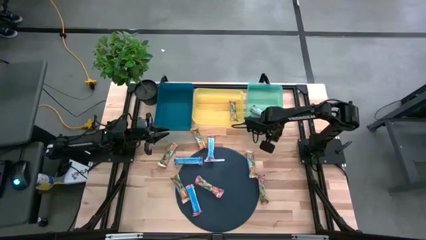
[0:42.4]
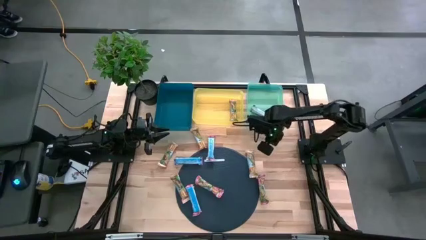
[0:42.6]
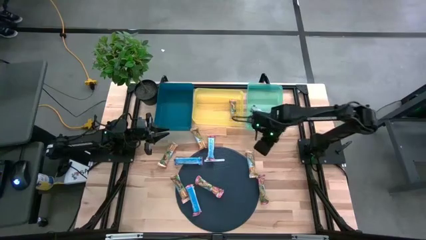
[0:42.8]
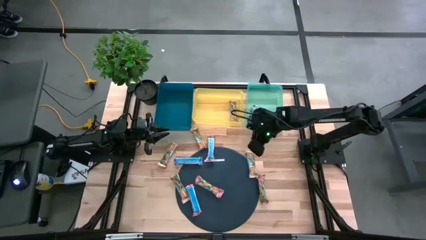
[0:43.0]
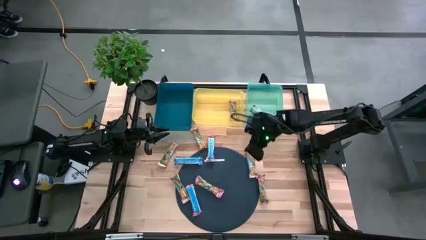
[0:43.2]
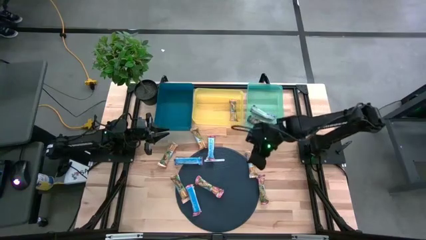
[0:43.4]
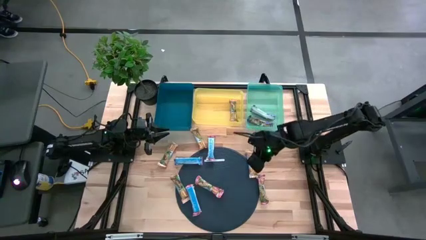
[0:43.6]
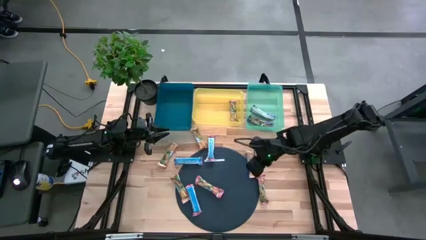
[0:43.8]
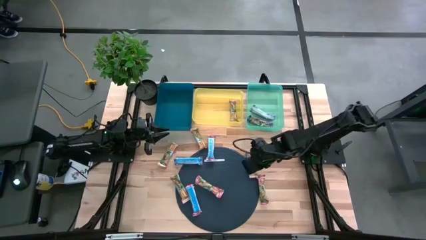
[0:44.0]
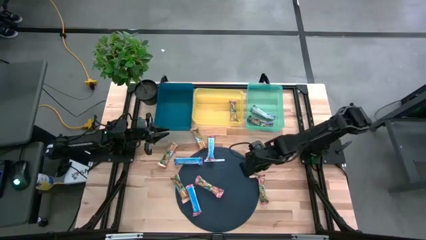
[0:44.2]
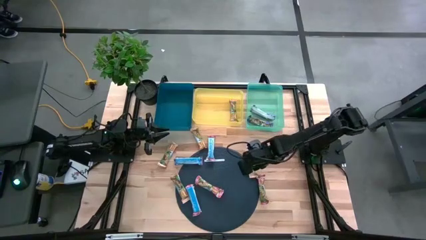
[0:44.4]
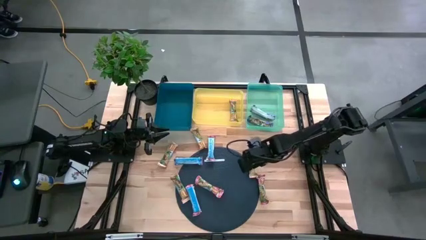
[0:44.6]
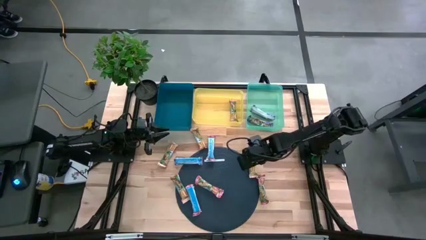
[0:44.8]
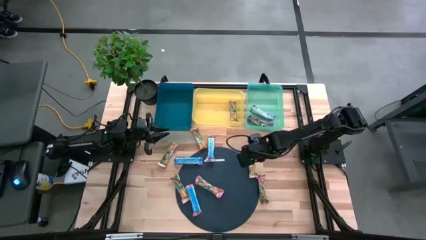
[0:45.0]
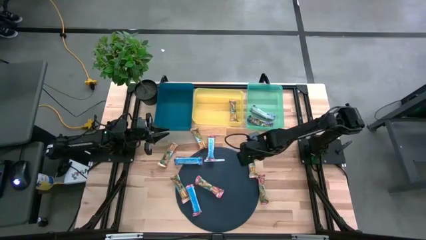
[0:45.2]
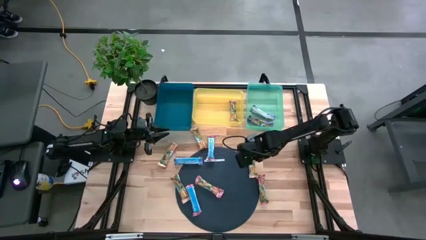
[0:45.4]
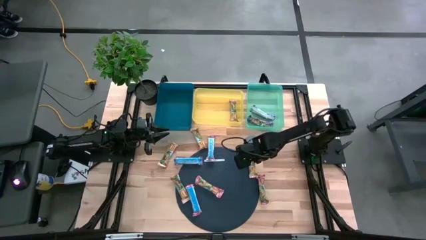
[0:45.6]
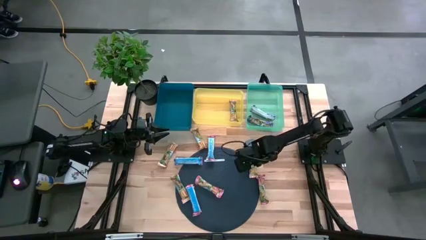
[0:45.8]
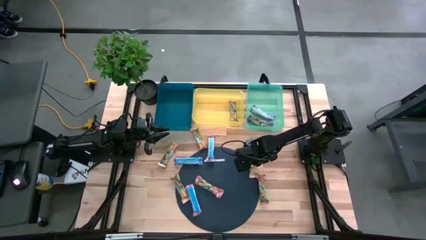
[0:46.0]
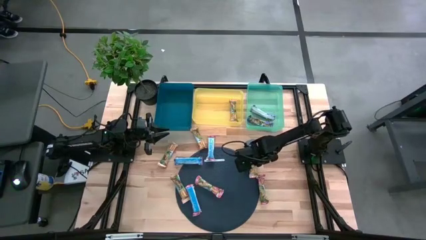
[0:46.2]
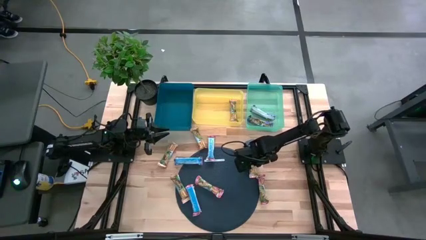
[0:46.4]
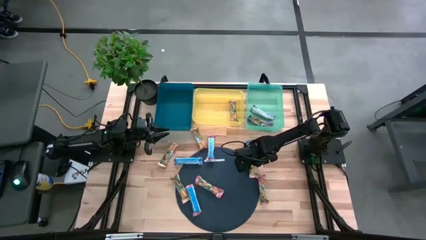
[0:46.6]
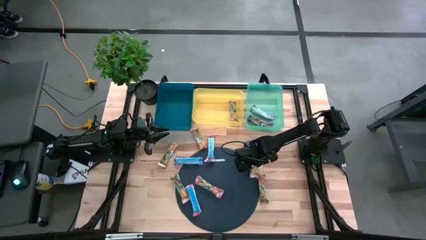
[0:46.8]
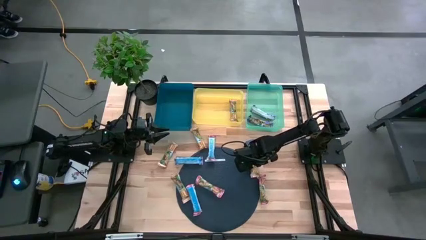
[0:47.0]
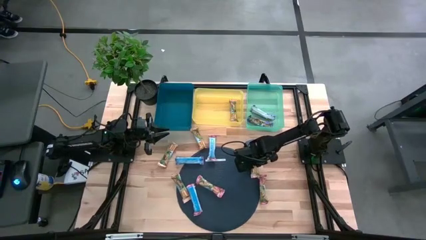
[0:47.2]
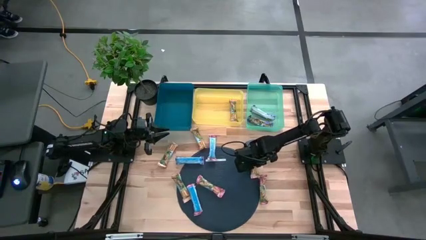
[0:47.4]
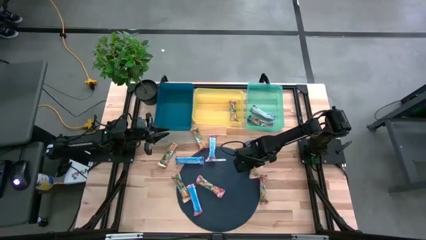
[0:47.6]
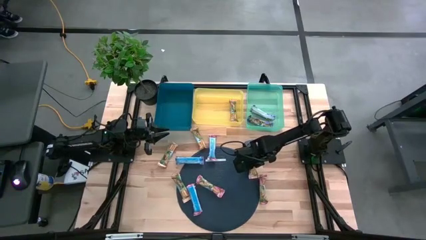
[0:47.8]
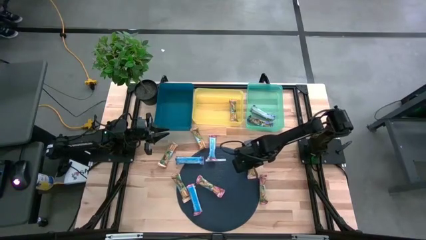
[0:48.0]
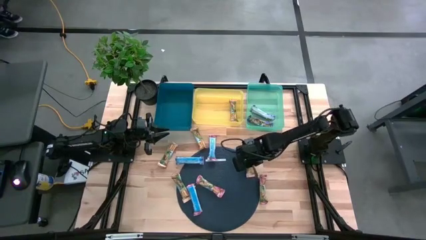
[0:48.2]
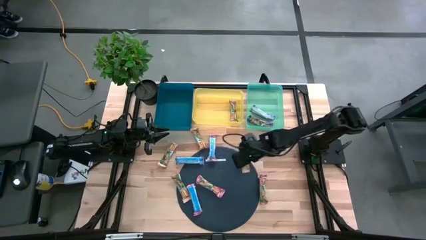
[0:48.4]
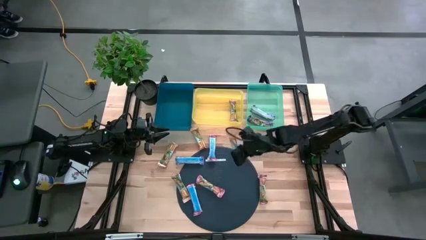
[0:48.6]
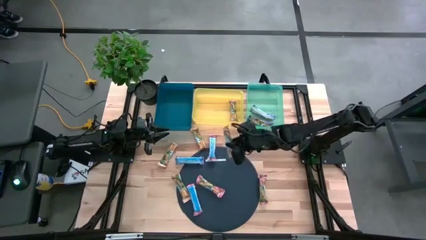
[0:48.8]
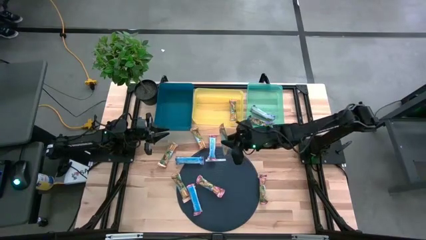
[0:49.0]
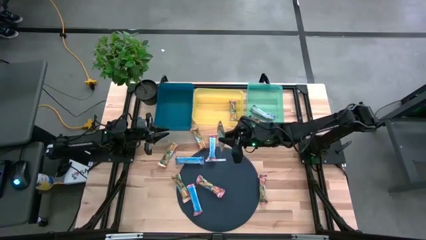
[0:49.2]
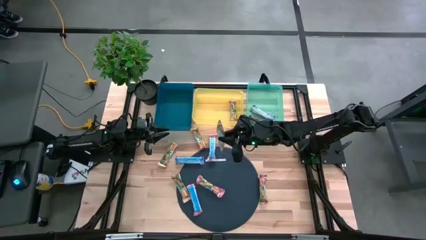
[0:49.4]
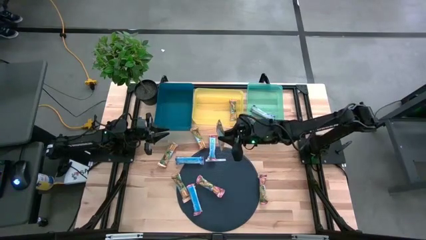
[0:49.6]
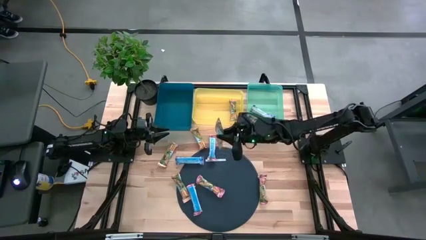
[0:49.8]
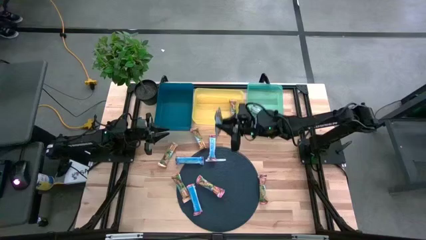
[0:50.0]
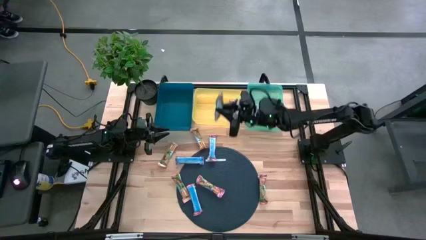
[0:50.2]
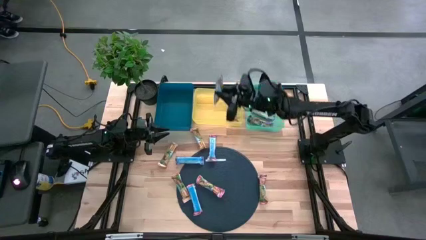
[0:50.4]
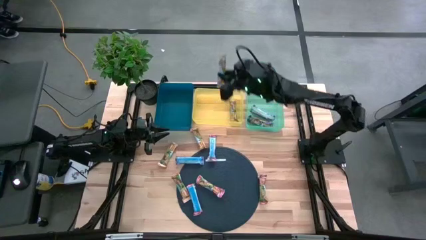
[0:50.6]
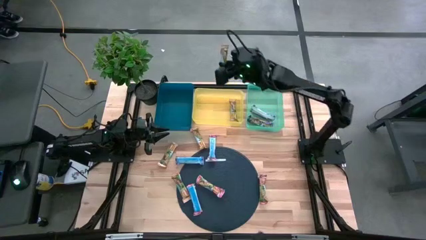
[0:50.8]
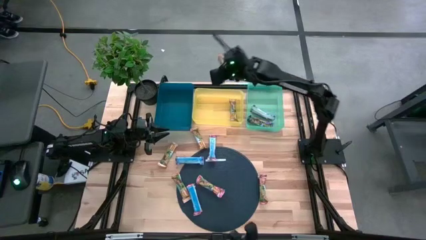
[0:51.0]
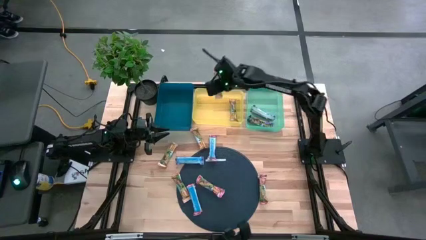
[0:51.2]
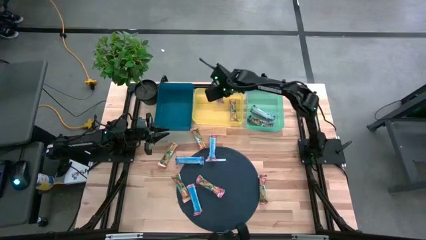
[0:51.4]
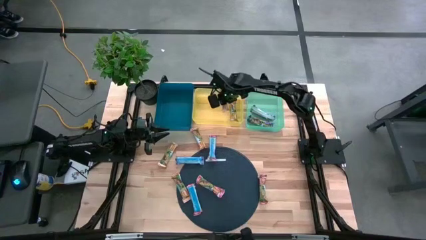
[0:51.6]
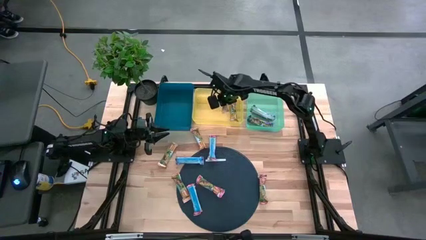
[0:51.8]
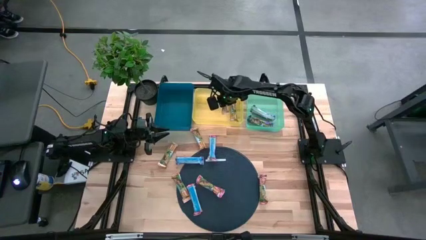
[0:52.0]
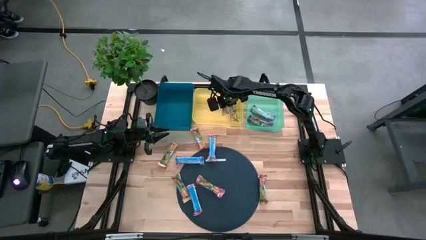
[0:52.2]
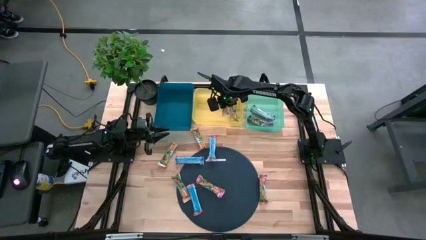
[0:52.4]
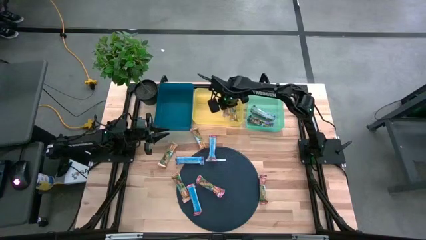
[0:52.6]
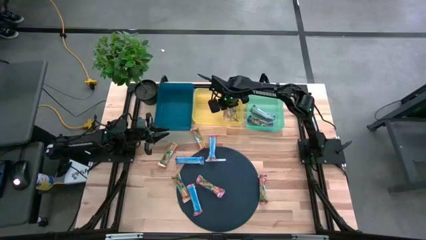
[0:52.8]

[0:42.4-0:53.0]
Task: Pick and place Granola Bars by type
Put the orange granola bar into the yellow bin

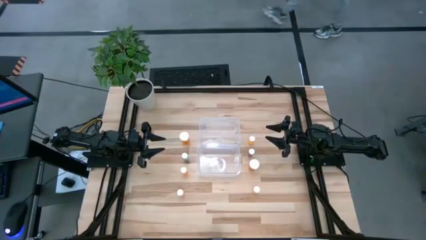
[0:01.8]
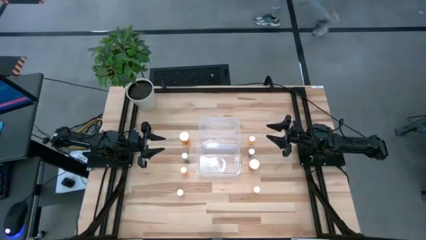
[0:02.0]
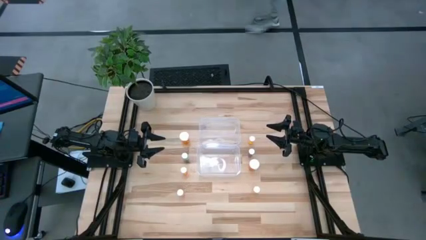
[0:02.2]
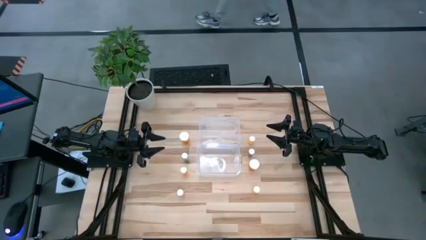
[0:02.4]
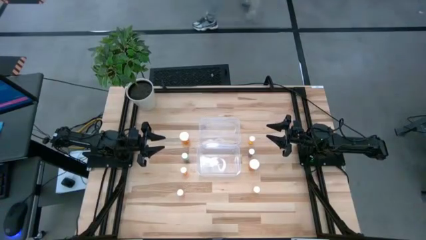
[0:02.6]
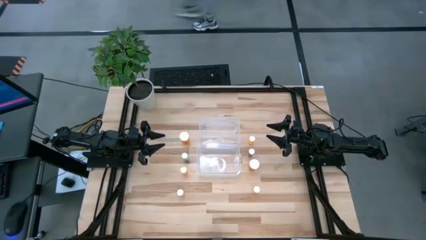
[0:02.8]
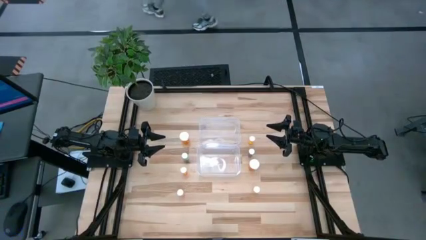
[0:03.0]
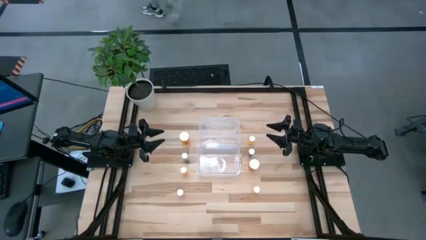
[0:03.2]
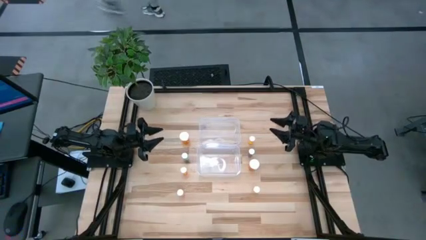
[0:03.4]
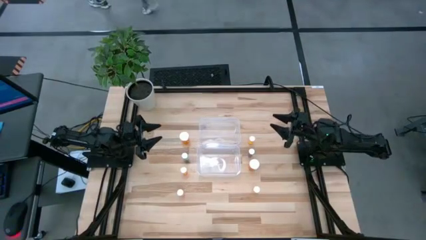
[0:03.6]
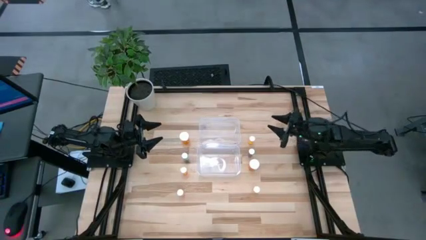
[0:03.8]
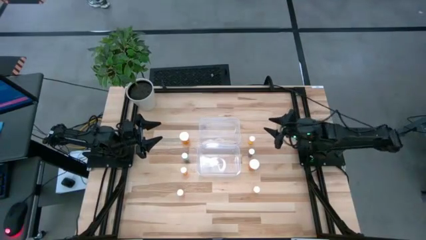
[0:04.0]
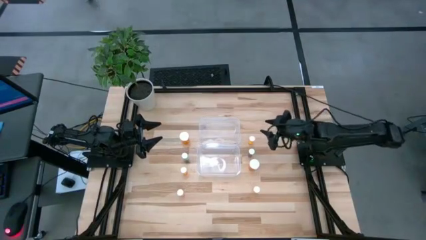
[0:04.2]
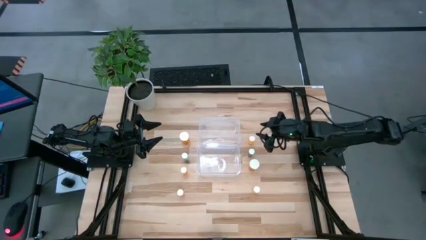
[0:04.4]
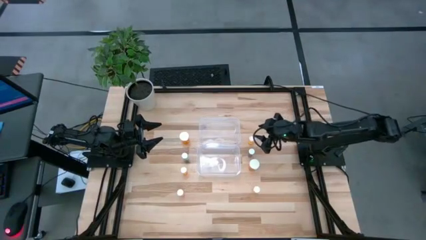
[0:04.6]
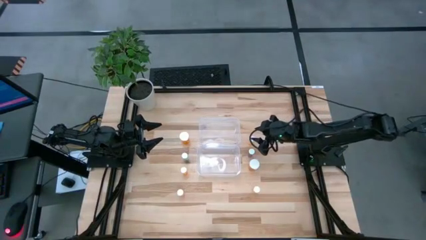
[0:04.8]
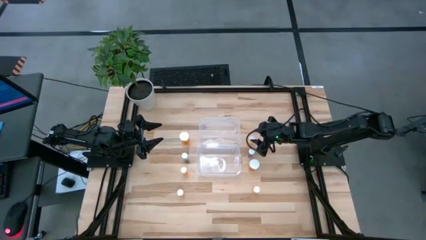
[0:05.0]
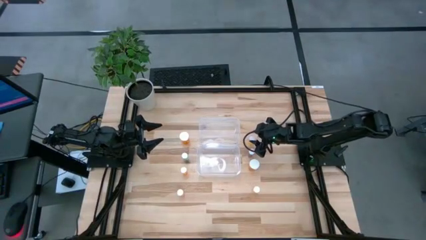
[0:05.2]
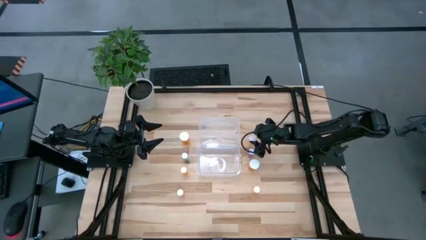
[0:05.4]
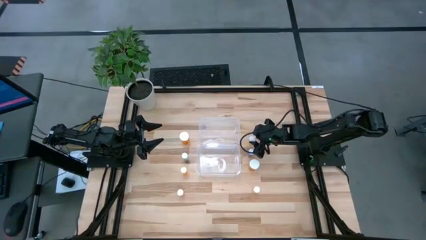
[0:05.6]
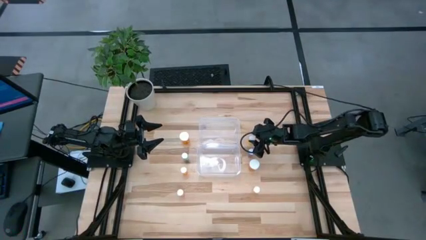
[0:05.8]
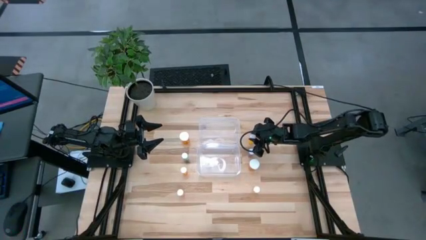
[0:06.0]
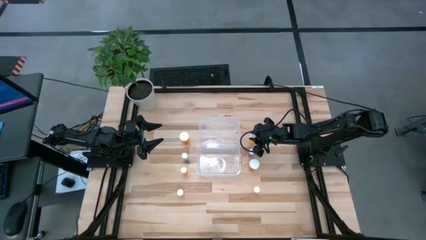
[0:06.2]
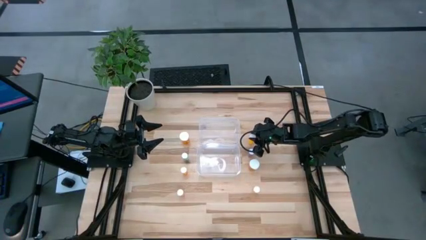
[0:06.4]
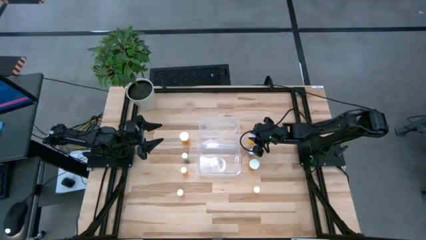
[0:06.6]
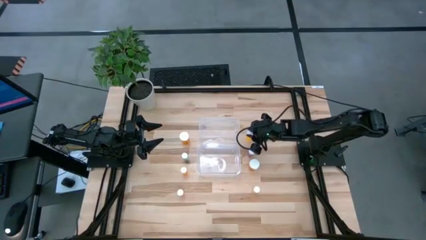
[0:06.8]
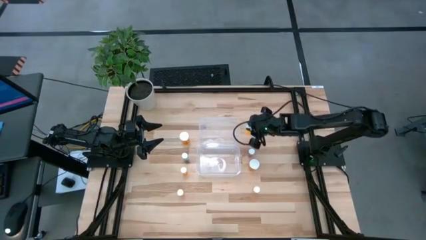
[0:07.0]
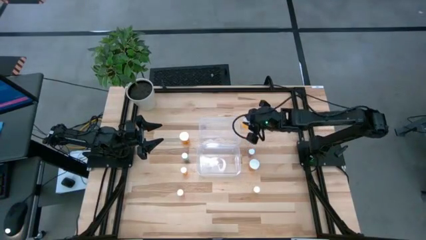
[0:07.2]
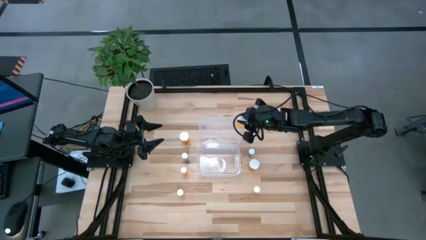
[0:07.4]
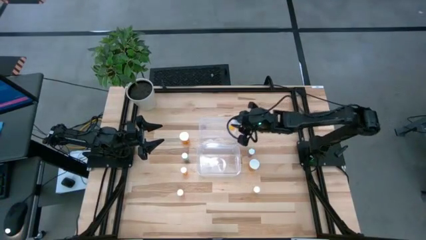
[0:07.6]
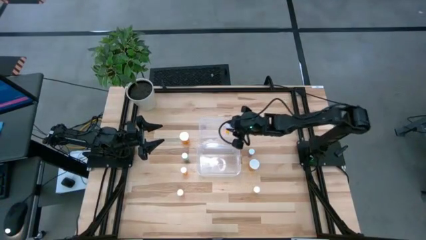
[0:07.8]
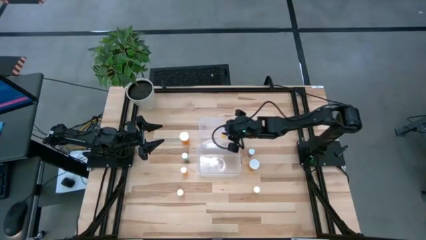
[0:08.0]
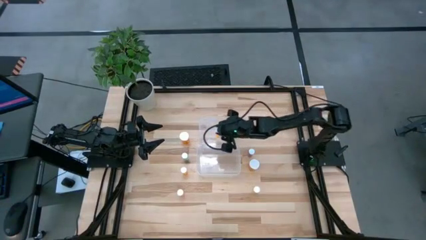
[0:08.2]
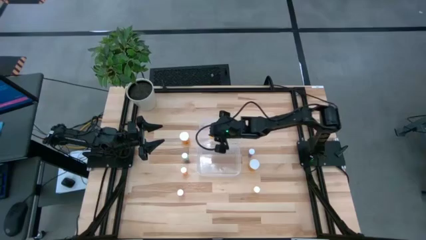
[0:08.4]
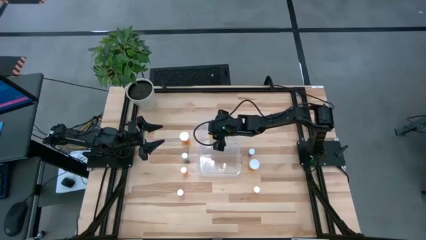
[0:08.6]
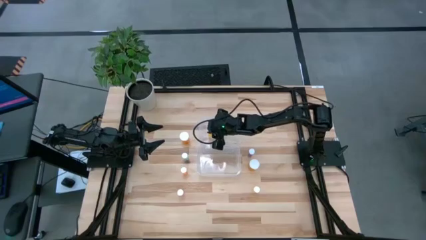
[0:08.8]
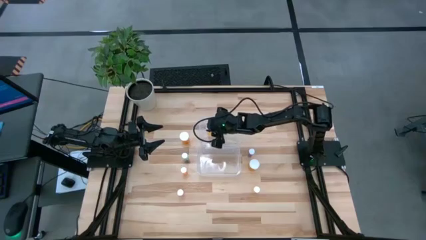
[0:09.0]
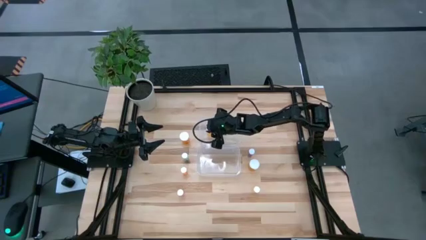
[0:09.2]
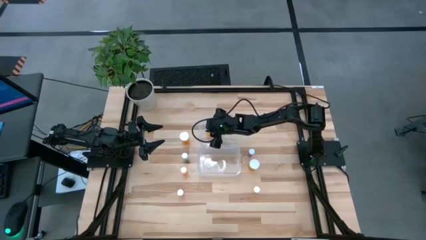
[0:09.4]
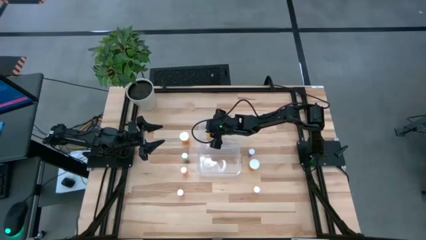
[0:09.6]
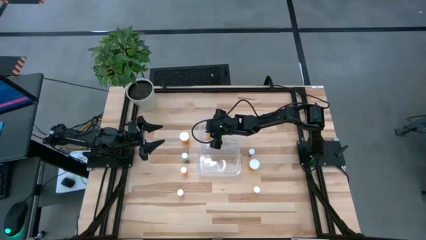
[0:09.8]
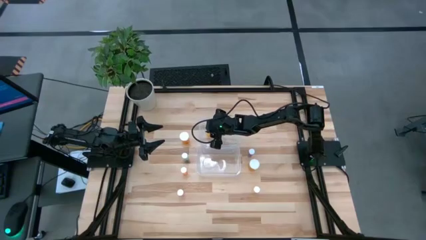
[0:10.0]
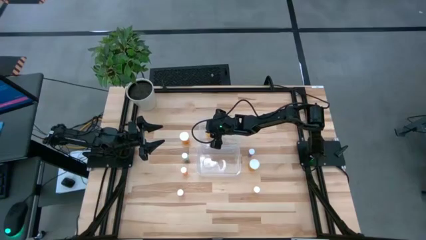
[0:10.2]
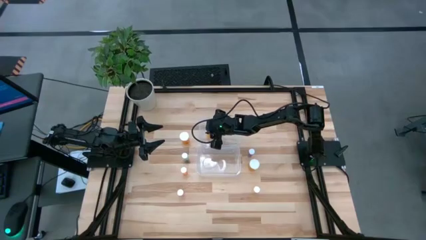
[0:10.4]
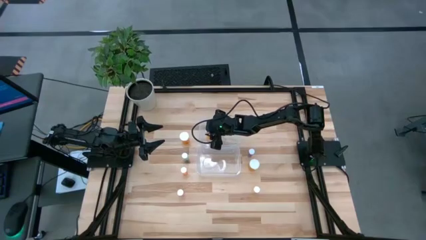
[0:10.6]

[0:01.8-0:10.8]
Task: Pick and place medicine bottles into bin by pill shape (circle, oval)
Put the orange tablet bottle into the top transparent bin
